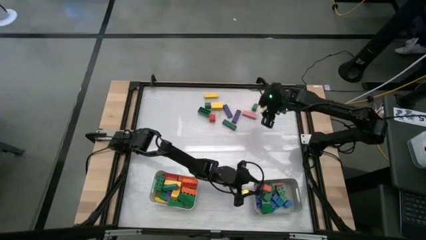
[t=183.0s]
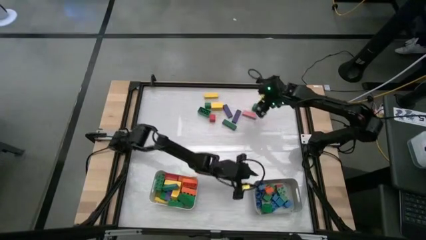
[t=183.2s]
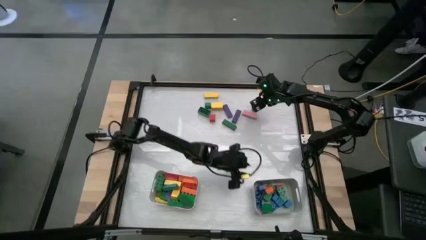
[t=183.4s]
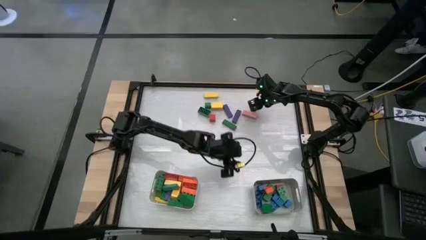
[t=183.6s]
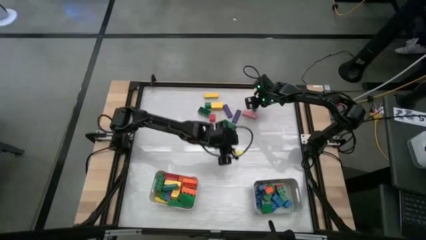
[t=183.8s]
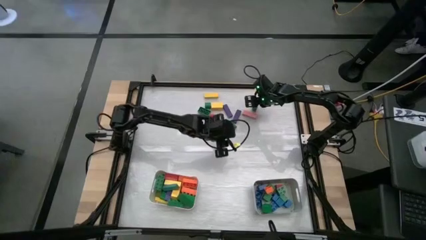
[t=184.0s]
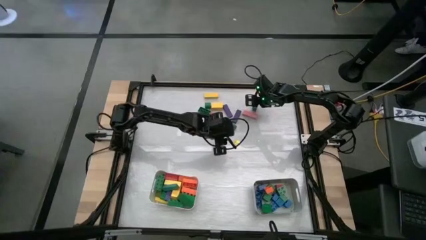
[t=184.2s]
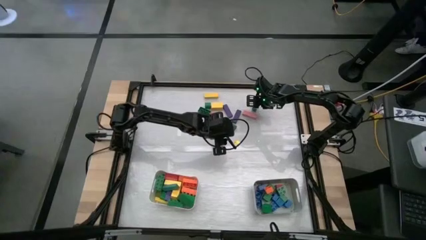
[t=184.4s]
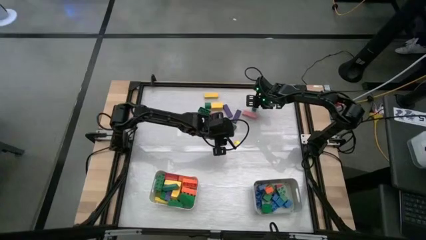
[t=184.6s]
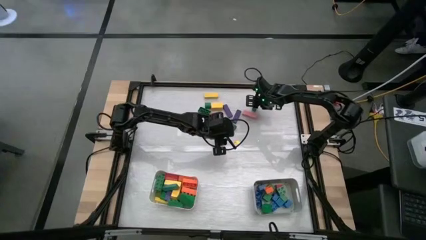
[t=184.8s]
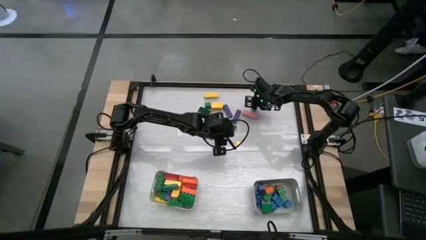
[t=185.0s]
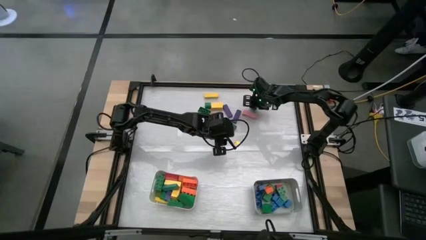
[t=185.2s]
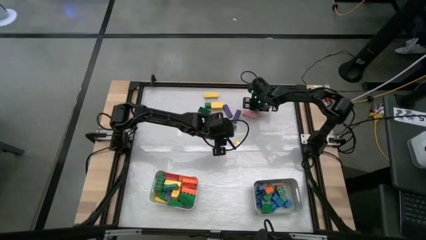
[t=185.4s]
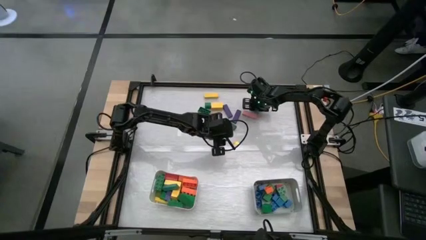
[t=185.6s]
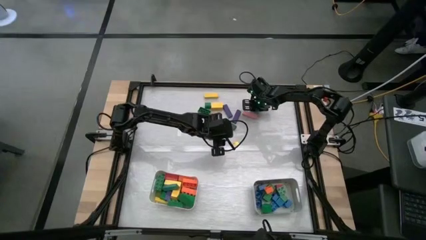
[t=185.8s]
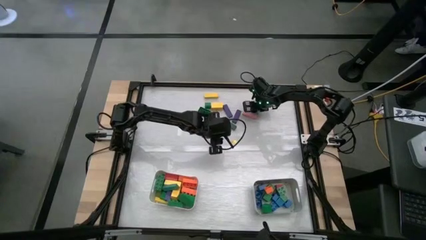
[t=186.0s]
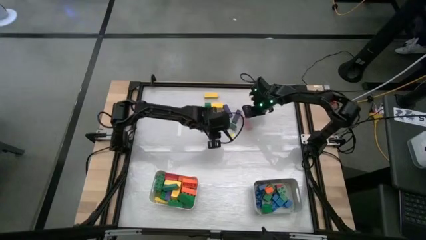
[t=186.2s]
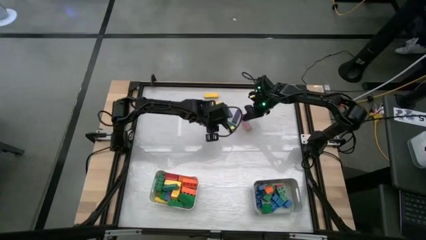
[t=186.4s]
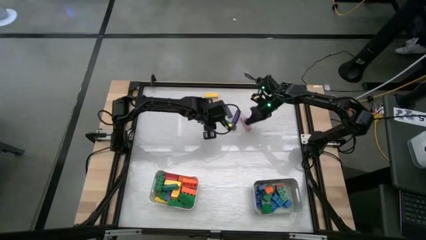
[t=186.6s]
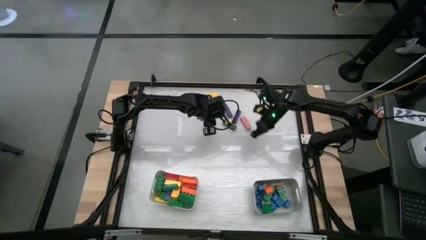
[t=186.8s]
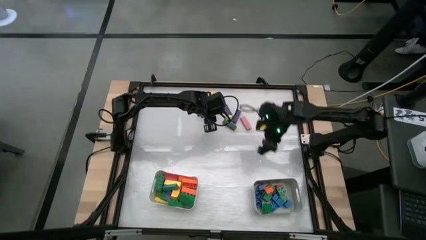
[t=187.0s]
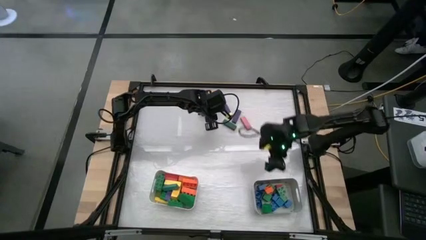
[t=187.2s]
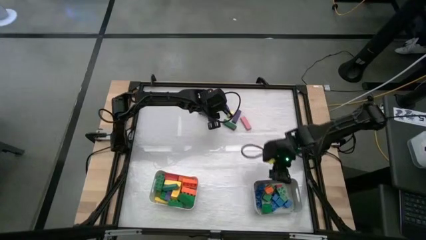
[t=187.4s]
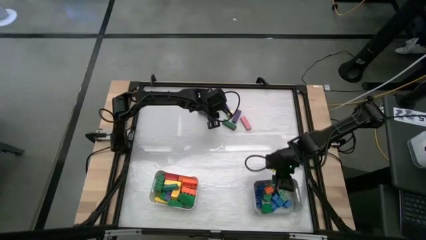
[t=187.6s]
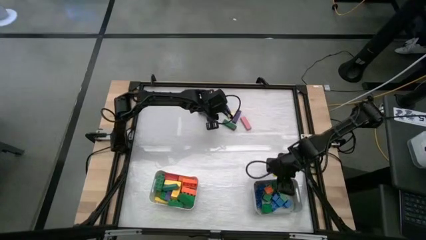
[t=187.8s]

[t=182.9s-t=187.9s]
Task: Sort blocks by size
Put the square green game piece into the gray bin

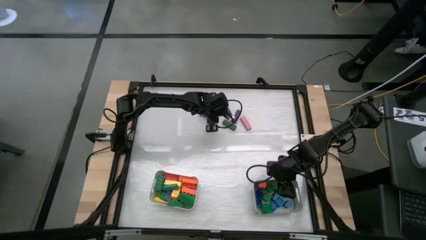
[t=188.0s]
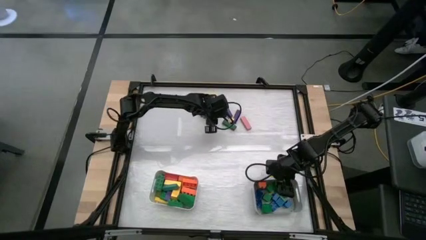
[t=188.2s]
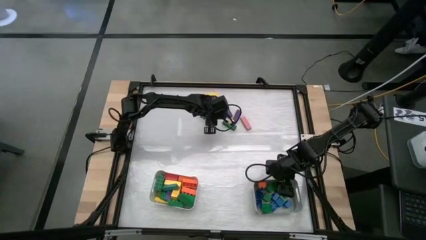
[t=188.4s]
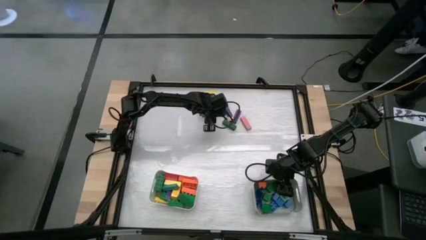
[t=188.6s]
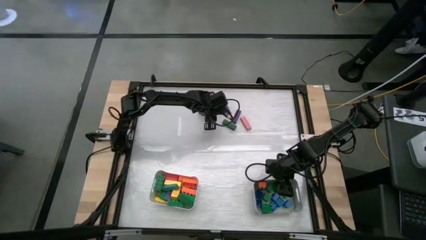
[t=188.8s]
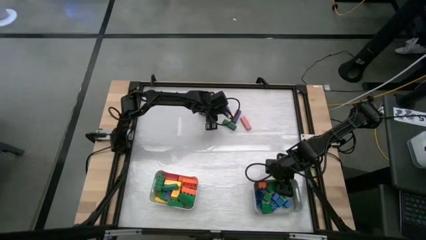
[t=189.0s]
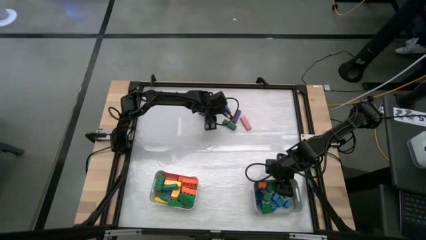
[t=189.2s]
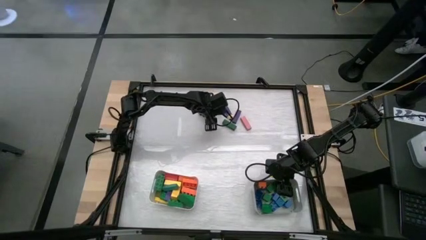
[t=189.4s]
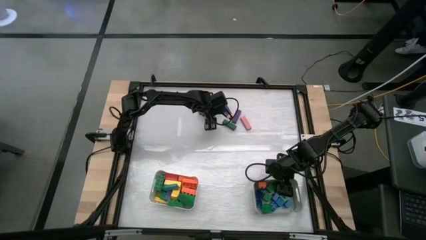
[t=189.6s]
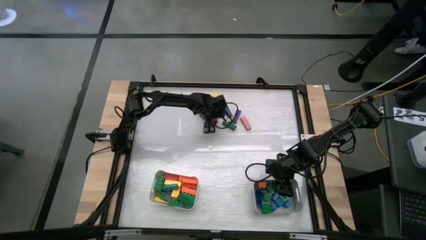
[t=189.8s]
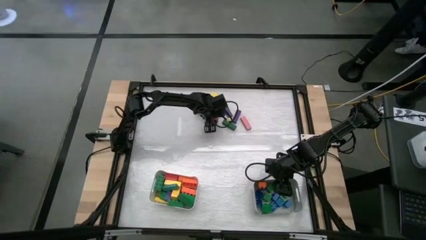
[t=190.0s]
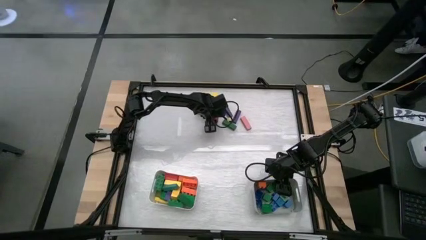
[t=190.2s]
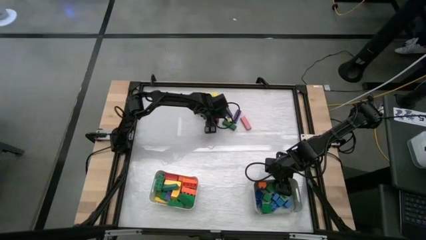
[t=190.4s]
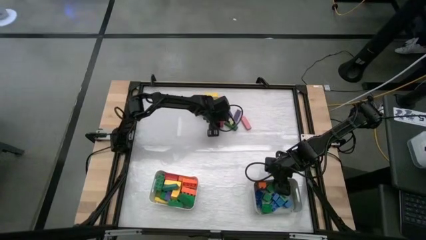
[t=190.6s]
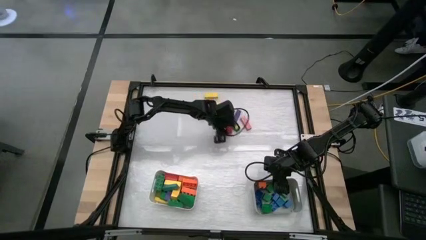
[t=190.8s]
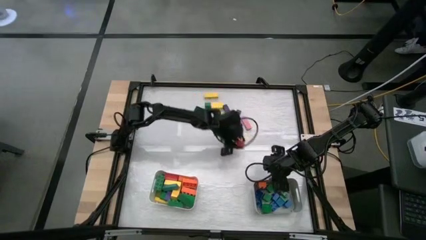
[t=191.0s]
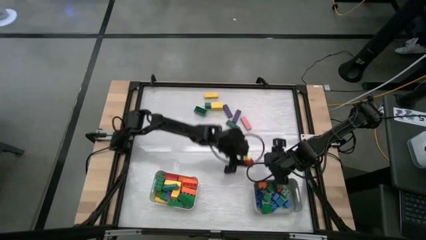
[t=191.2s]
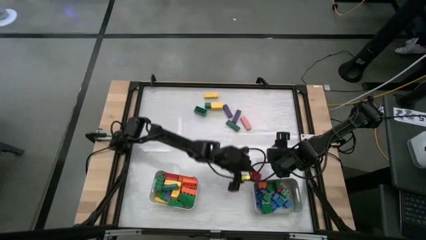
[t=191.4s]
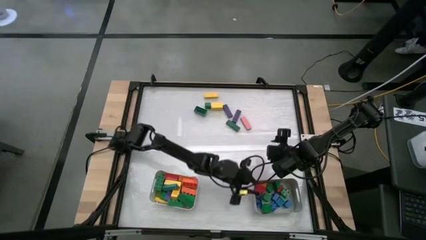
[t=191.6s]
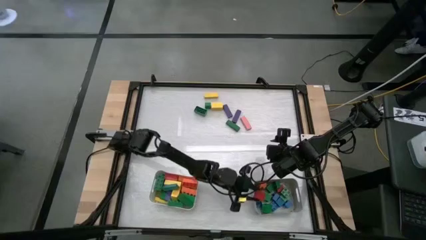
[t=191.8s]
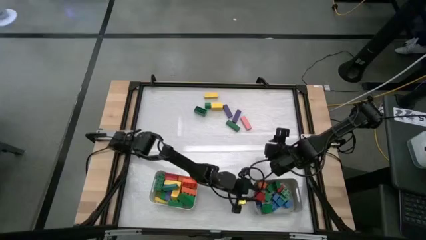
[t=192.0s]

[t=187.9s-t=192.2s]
Put the square orange block into the gray bin

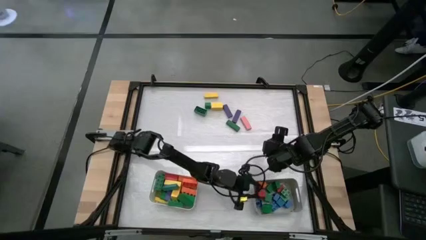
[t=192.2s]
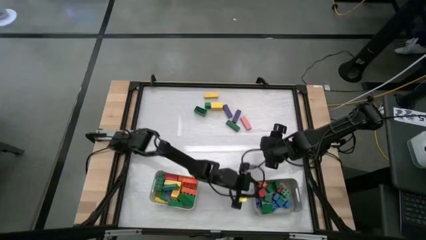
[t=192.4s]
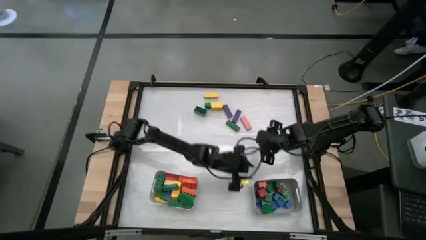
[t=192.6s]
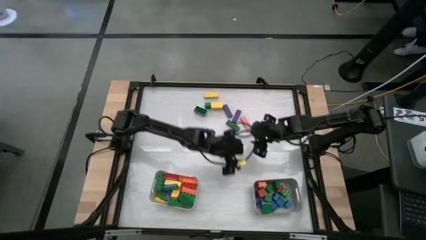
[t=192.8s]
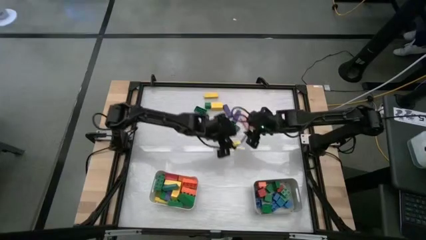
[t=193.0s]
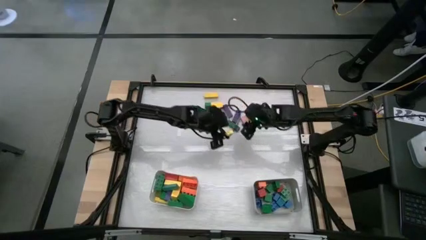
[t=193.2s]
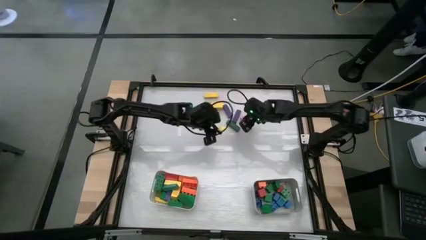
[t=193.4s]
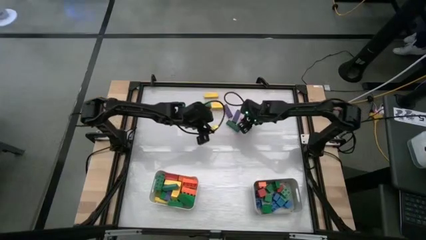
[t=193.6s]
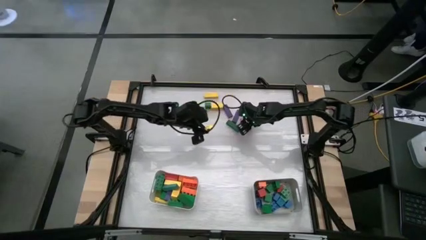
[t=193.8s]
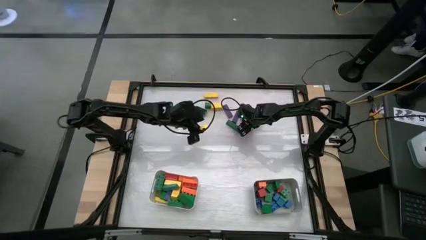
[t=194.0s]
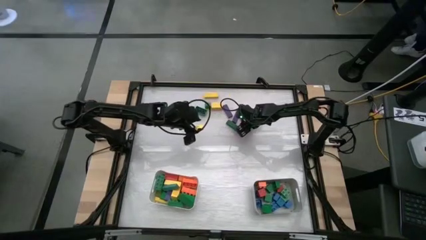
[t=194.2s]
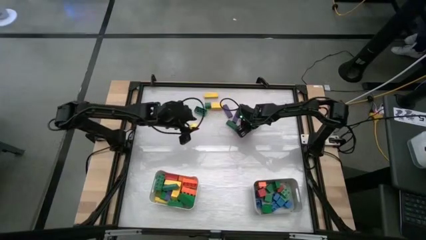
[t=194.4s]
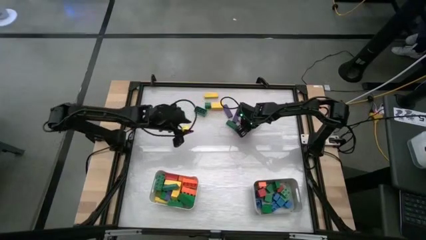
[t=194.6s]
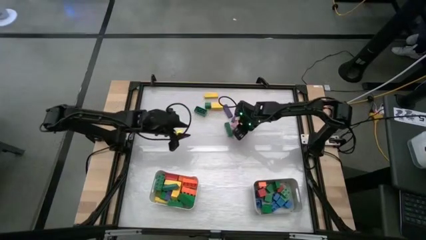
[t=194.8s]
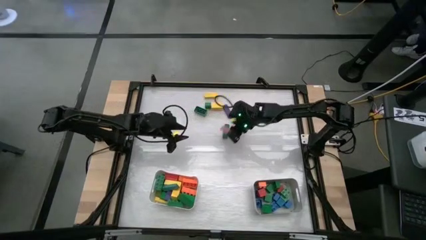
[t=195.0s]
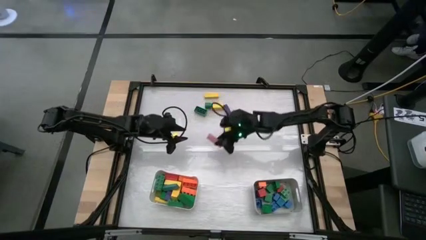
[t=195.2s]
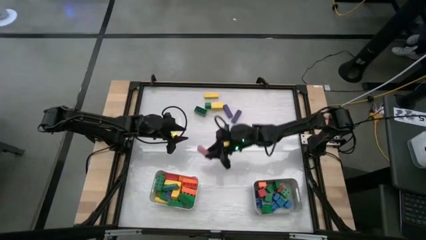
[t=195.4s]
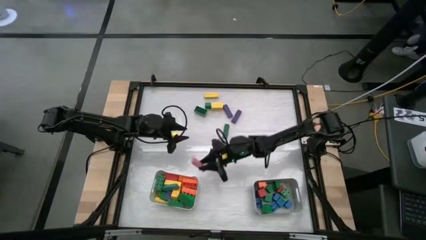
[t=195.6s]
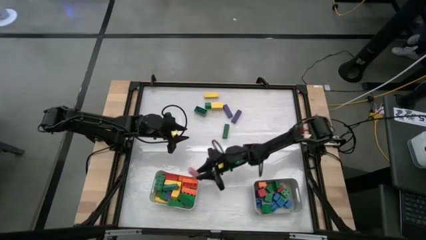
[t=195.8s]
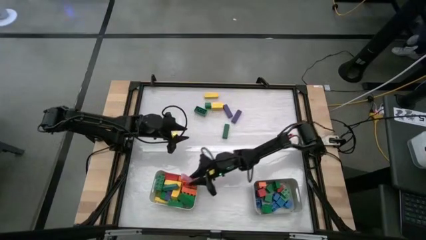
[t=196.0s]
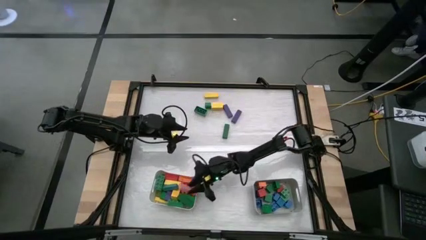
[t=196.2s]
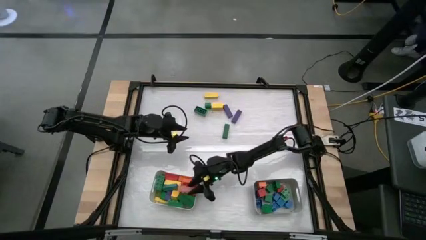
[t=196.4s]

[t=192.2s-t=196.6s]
Put the rectangular pink block into the white bin

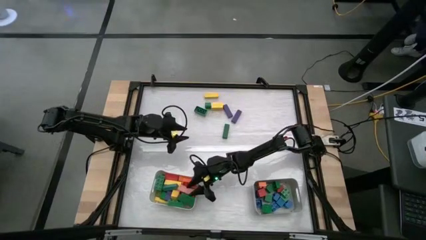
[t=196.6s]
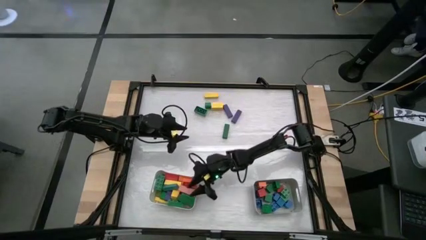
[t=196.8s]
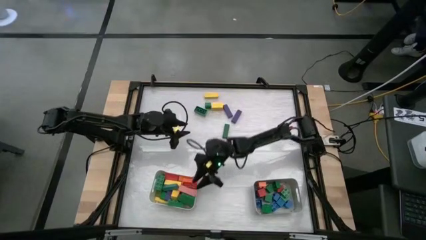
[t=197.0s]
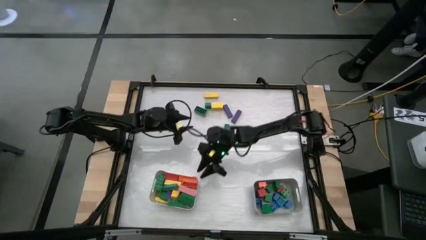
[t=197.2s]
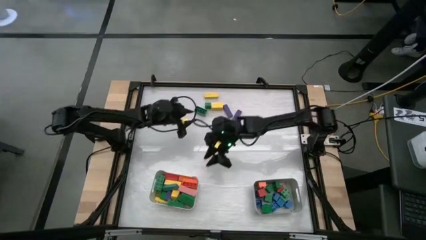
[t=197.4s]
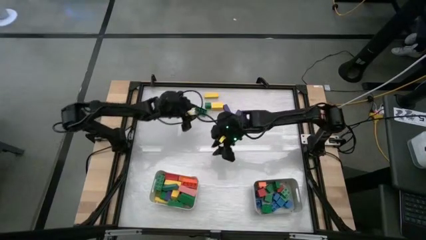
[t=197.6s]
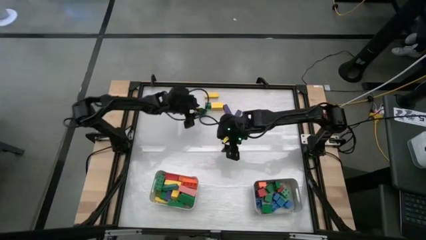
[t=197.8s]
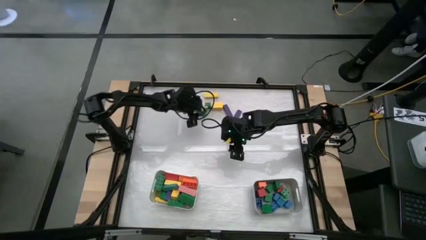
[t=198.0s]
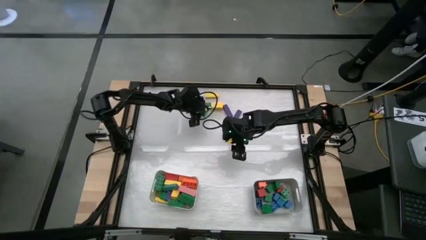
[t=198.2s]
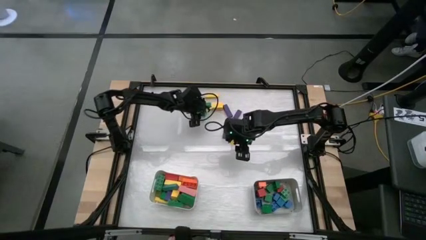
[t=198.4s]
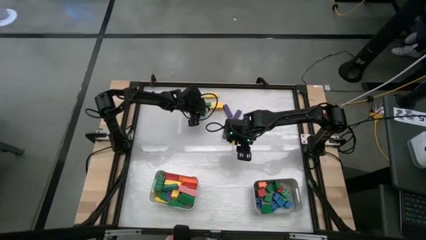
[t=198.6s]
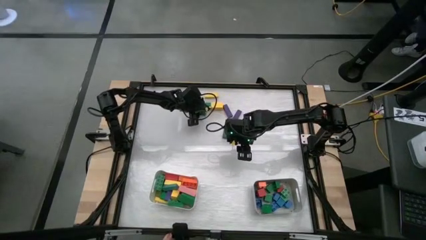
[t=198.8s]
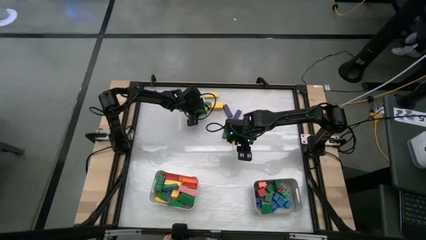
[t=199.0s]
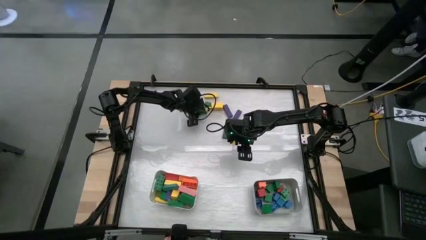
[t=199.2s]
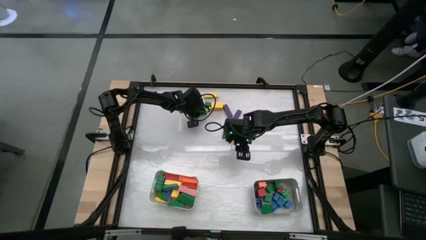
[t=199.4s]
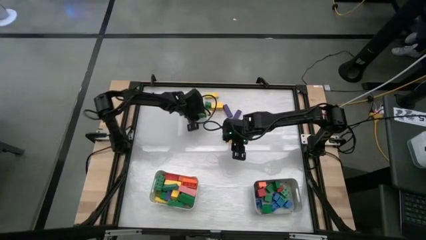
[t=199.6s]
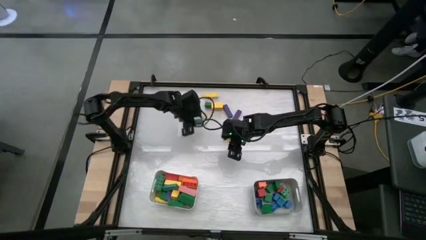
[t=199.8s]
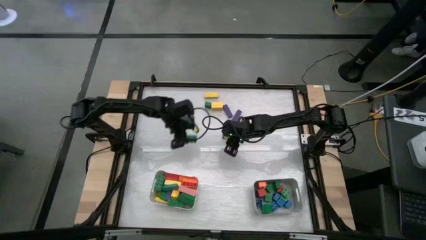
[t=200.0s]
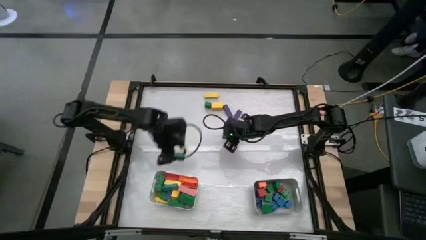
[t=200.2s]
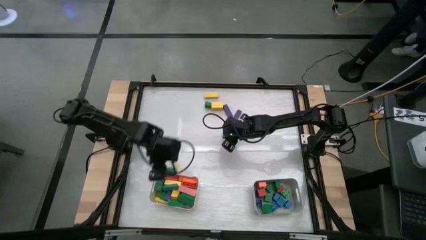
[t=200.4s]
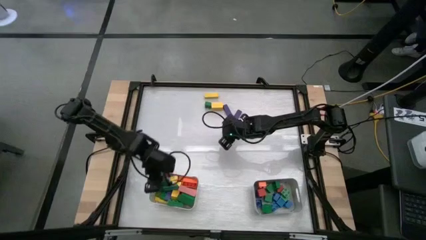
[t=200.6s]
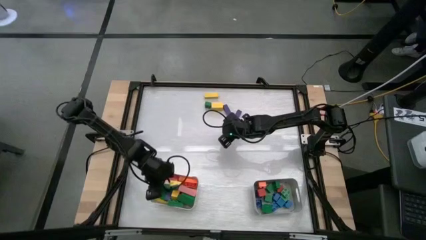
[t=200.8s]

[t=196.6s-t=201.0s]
Put the rectangular green game piece into the white bin
